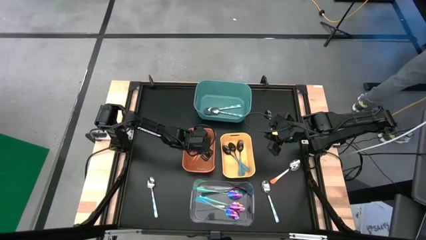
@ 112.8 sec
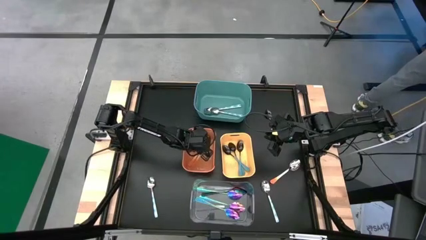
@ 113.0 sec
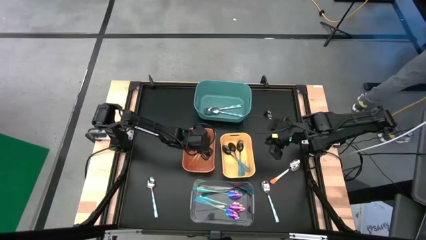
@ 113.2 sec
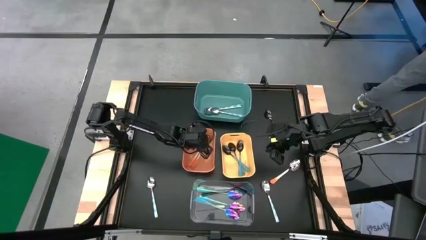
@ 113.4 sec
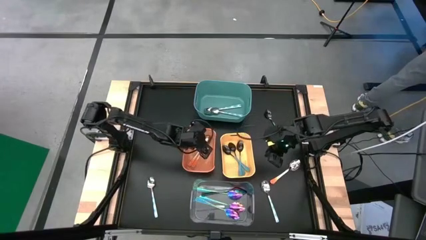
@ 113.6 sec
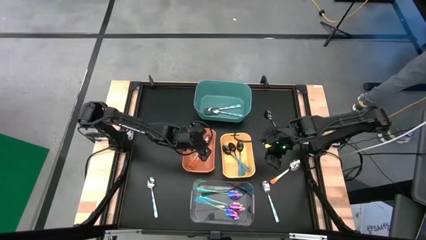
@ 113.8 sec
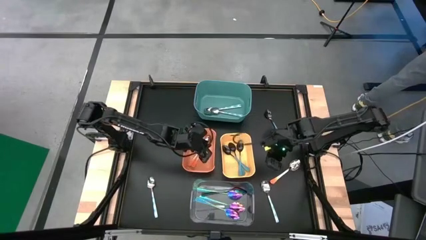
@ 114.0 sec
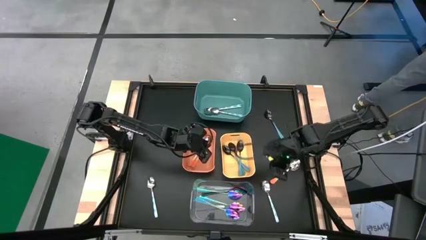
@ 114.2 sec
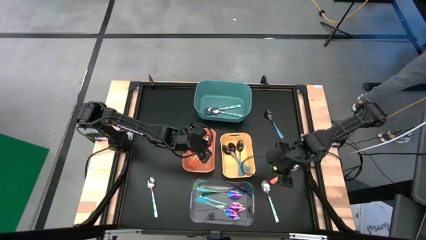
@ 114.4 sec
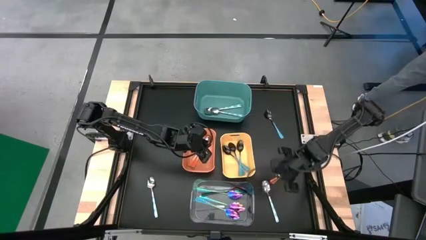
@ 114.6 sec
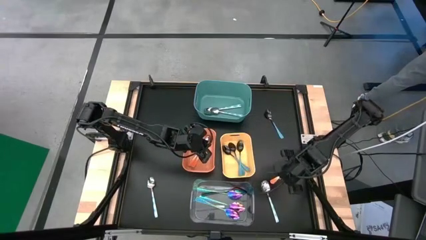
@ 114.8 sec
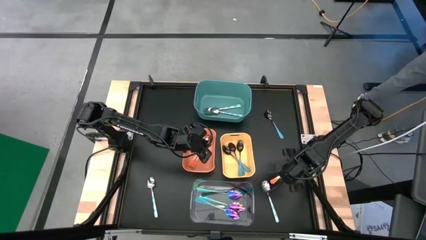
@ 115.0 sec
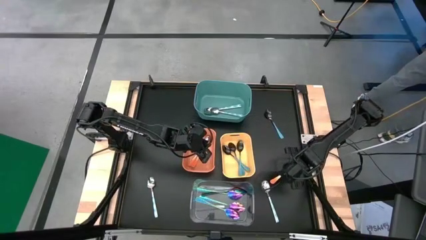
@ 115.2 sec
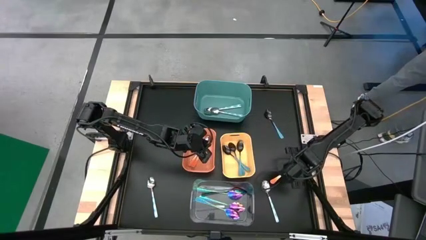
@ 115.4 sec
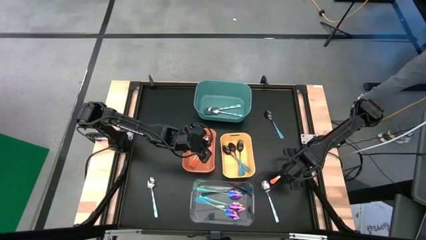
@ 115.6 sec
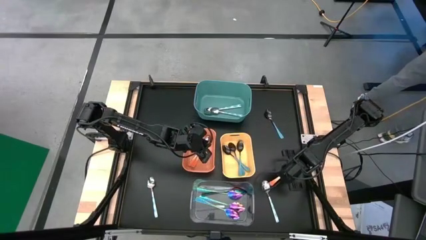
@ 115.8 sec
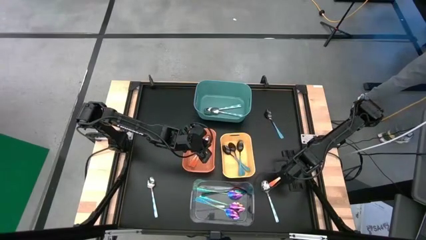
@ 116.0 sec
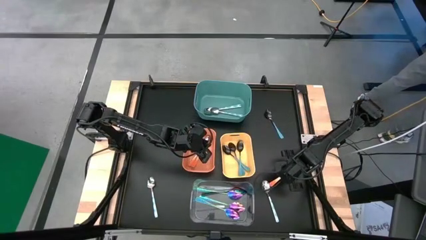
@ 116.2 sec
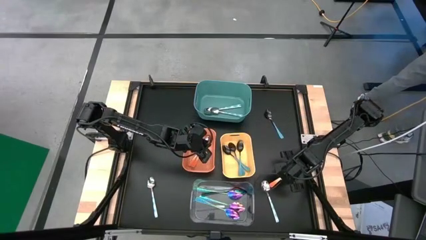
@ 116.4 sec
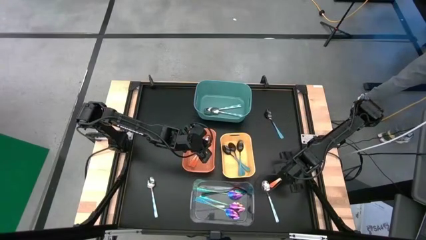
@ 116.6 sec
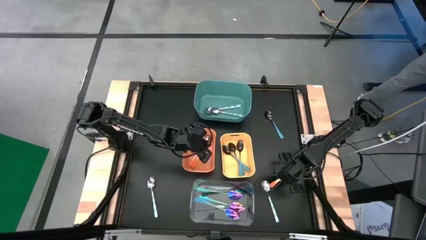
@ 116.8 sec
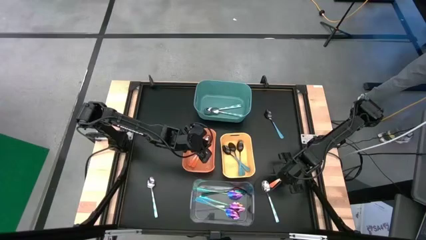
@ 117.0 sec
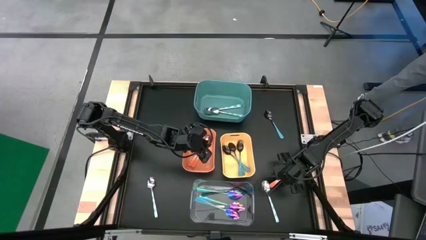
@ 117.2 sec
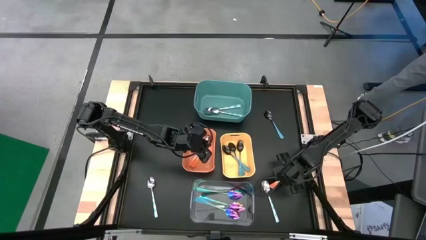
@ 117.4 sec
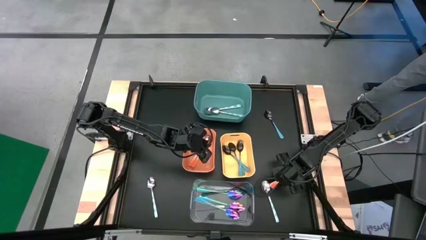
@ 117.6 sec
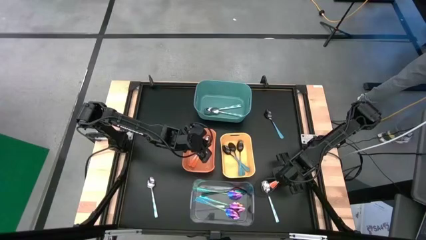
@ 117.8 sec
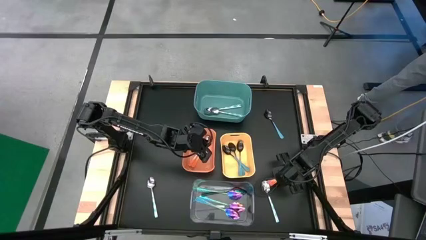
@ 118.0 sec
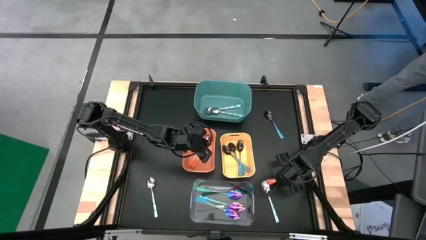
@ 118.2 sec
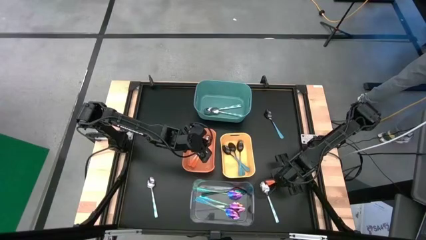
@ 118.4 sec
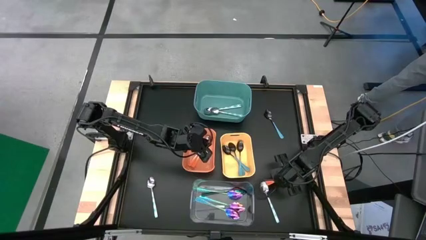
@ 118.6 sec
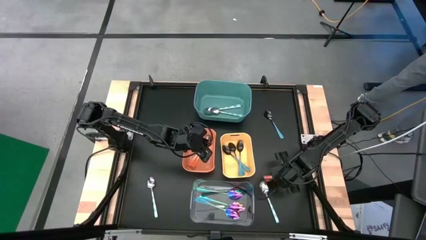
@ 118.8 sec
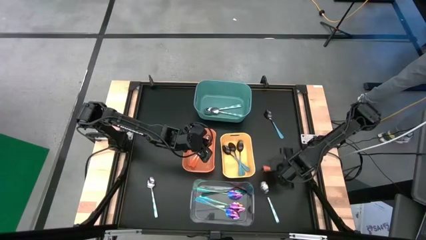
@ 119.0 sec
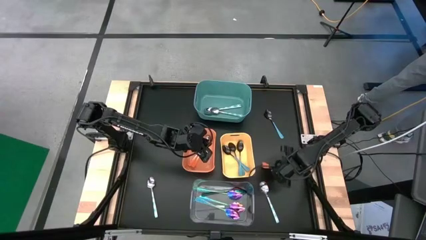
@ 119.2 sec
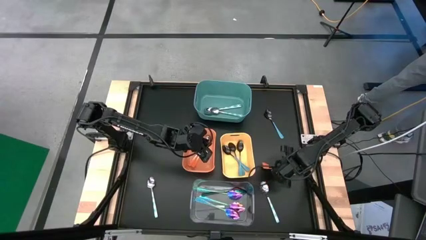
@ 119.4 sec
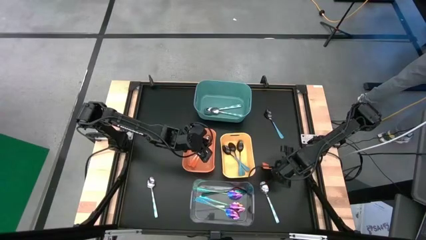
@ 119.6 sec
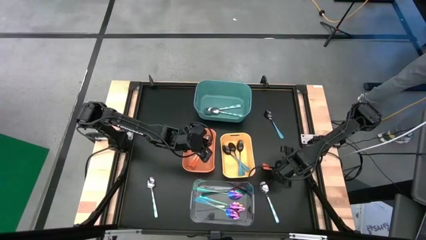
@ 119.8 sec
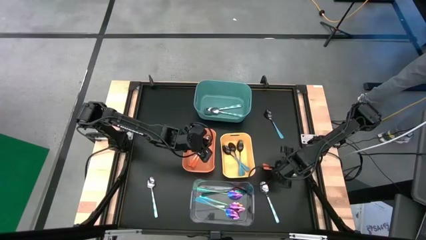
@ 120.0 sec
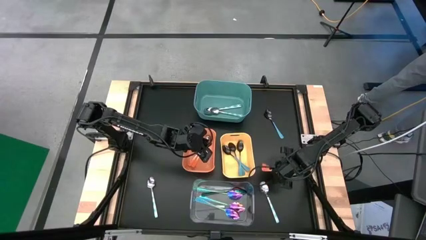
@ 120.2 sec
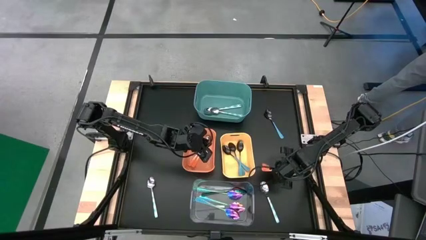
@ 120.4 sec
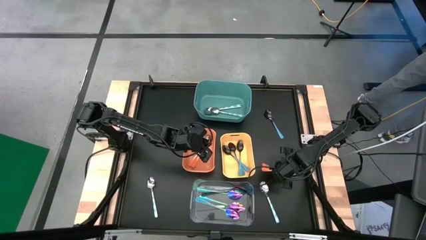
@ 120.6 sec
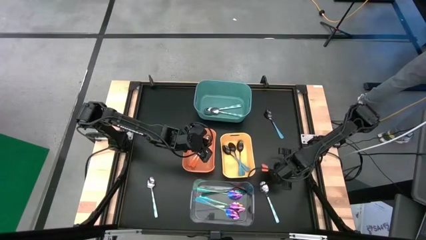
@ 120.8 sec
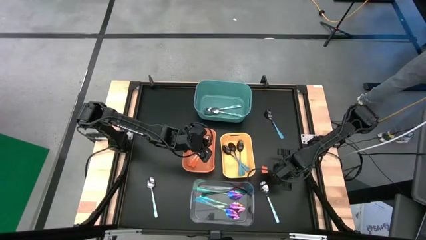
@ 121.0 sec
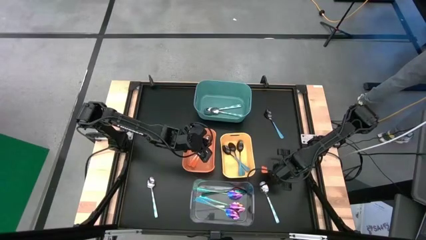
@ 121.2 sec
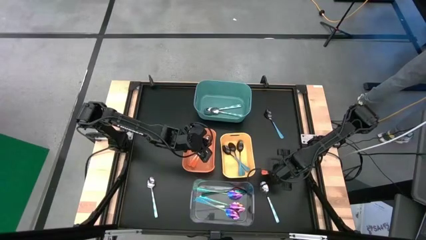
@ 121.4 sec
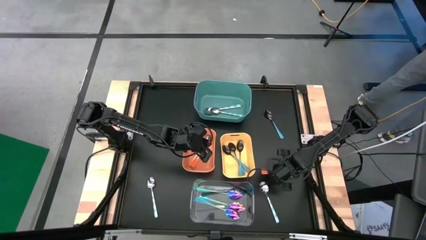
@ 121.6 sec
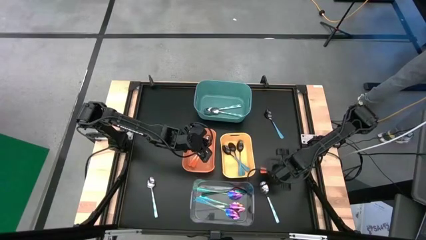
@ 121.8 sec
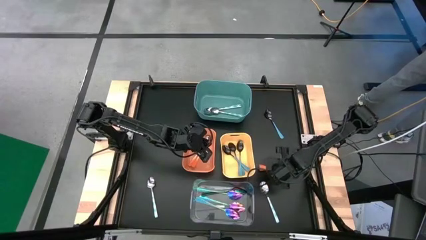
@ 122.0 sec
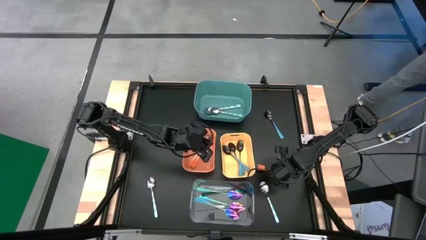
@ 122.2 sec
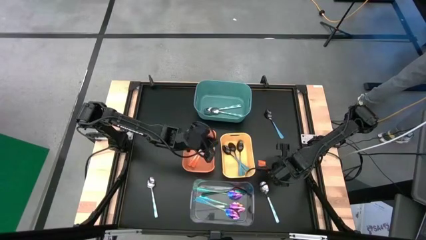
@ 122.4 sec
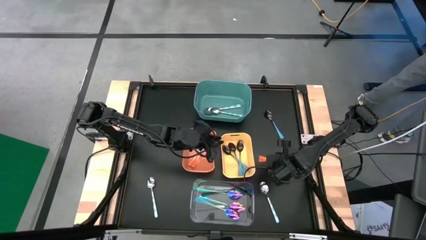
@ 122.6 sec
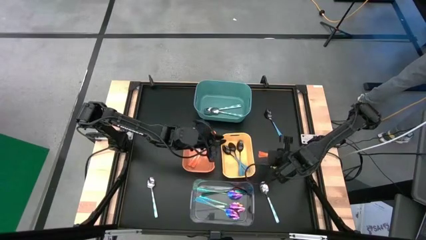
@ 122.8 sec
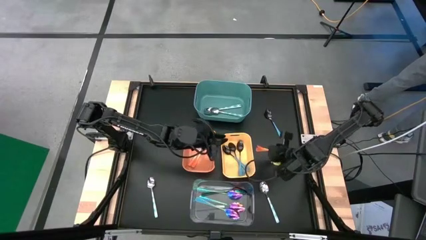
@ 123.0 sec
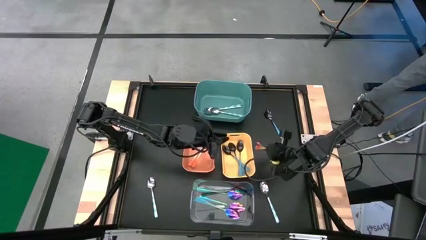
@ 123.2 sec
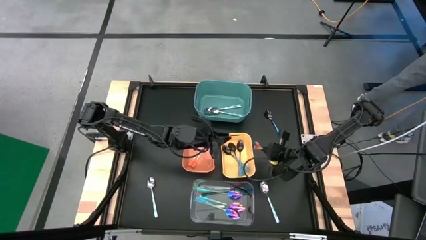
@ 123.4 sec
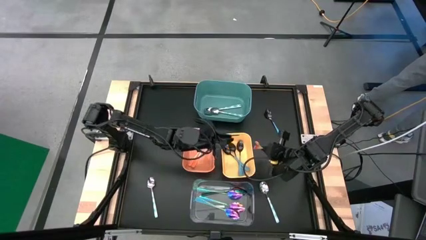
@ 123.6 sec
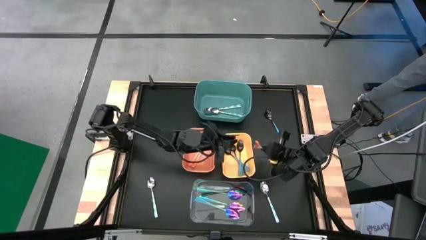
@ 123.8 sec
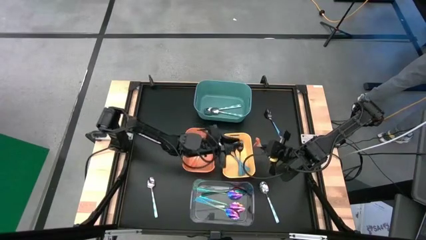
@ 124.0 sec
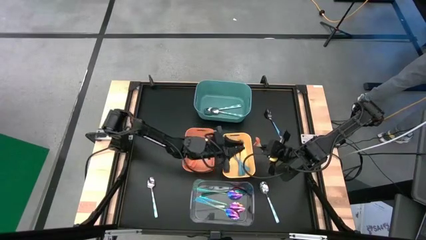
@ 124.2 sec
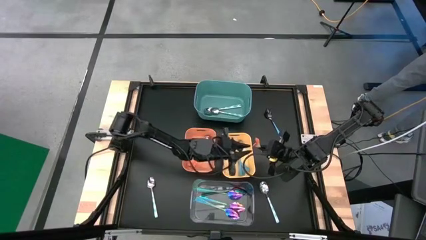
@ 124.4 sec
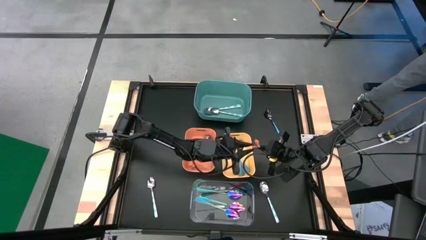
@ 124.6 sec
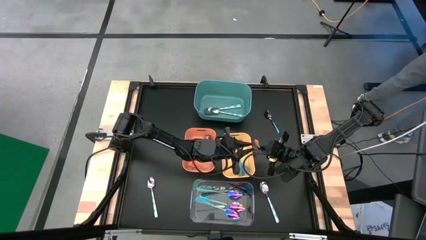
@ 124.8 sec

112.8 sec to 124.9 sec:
Task: Sort silverware by color (type)
Put the orange spoon into the orange bin
